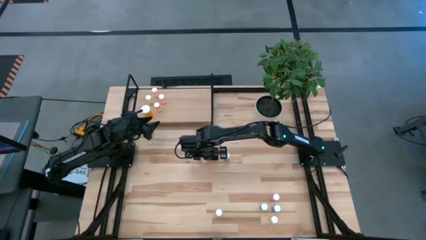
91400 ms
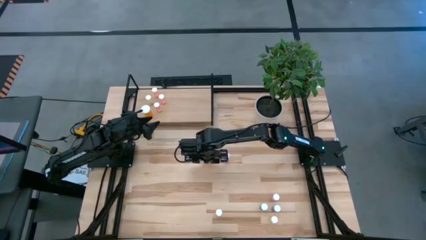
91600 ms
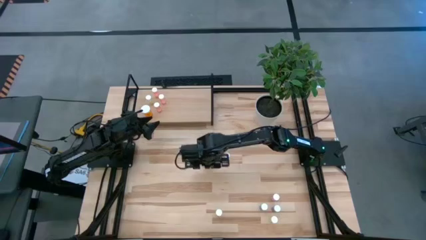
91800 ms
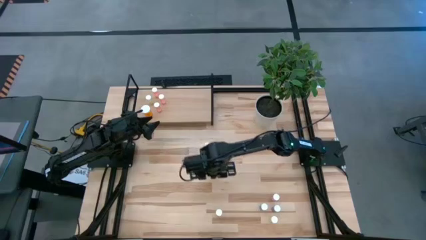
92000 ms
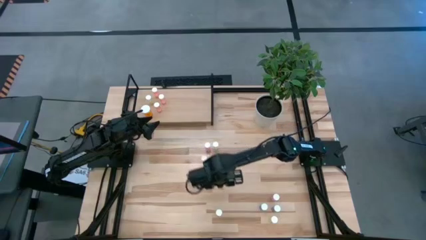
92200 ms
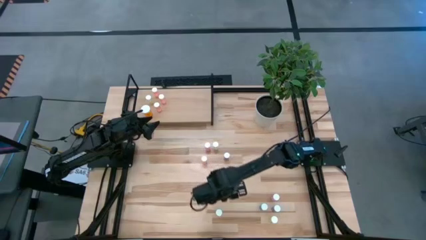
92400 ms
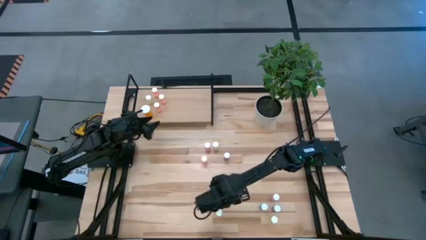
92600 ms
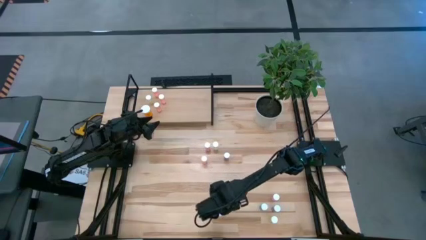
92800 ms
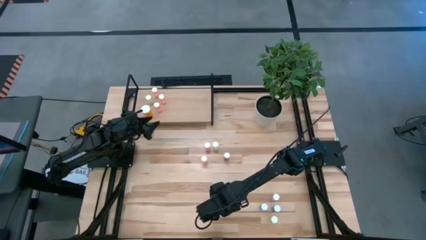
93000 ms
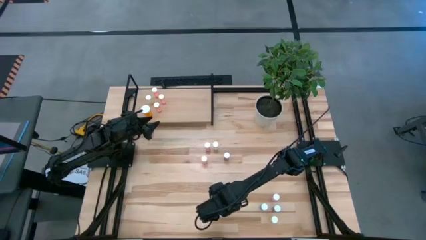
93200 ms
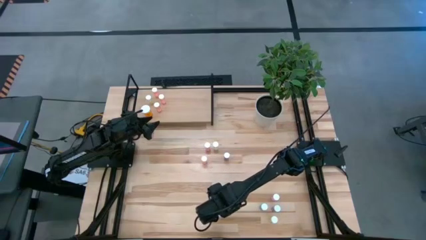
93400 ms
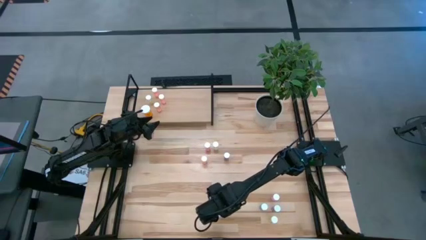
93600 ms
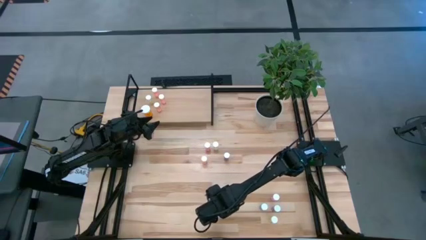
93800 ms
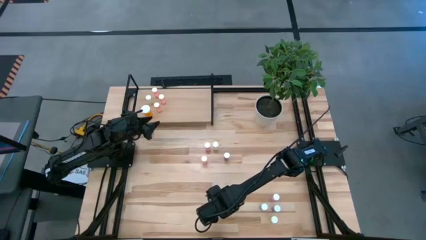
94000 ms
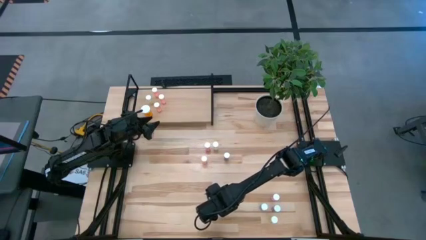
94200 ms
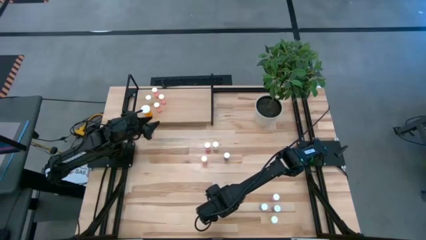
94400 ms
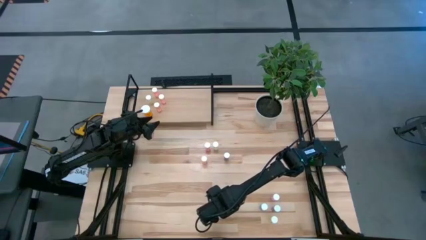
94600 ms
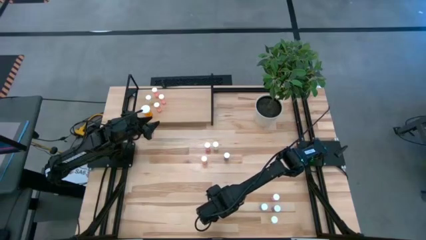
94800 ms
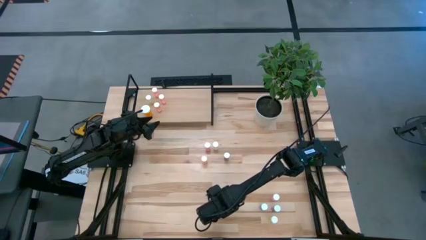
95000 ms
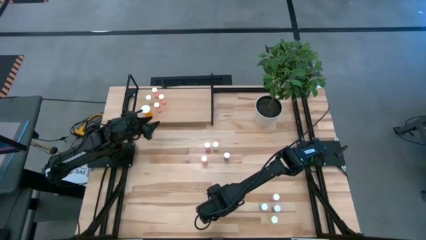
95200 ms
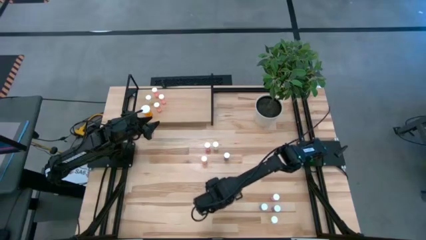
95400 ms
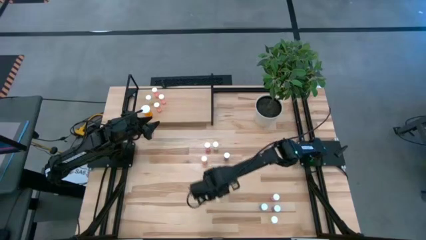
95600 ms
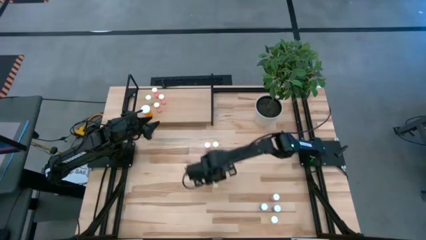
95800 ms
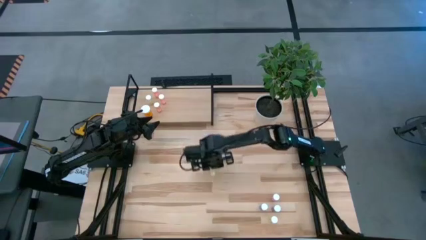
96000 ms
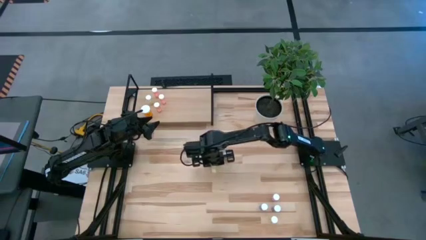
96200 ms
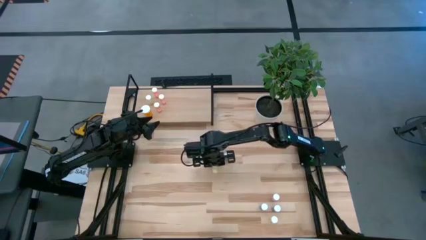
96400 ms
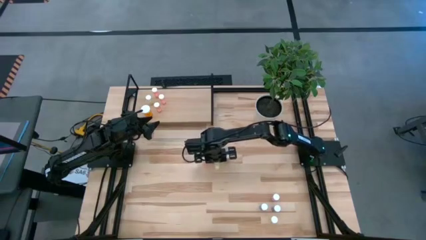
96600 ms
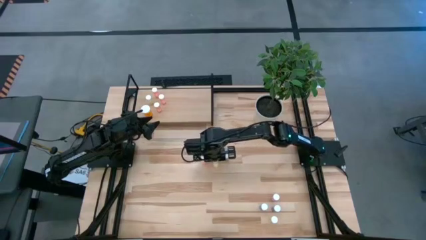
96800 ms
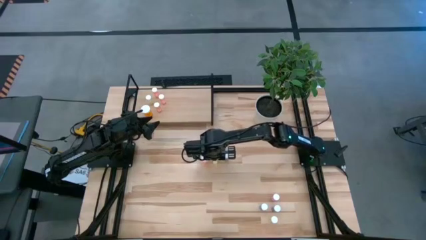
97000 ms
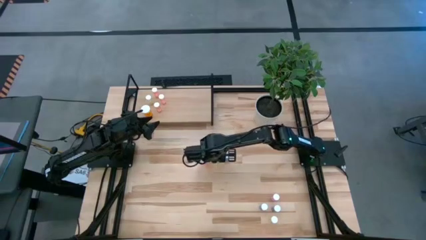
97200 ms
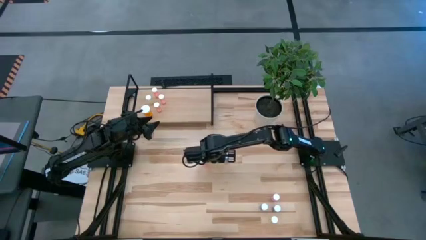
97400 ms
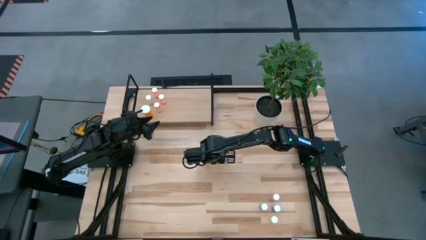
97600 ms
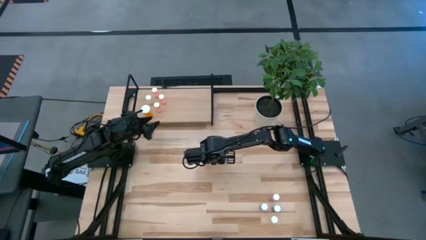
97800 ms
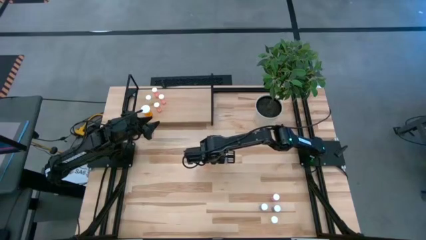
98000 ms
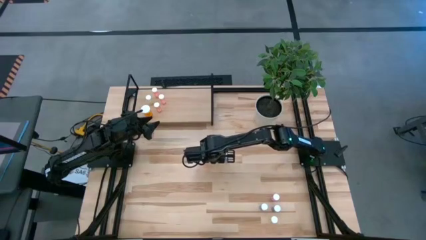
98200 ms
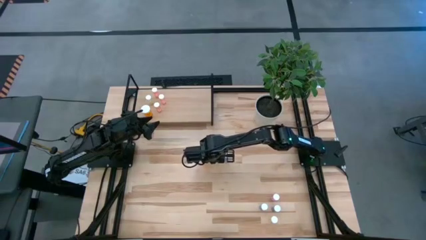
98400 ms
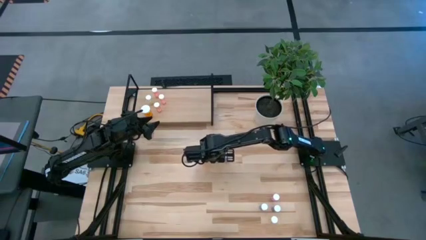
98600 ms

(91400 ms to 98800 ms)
Task: Pick and place medicine bottles onto shelf by color
Move the yellow pill bottle to the center

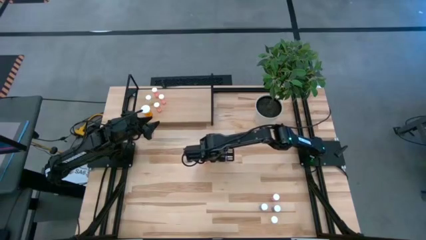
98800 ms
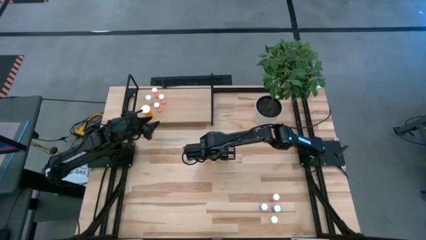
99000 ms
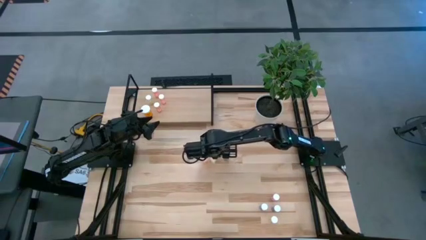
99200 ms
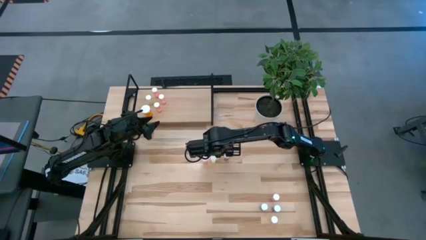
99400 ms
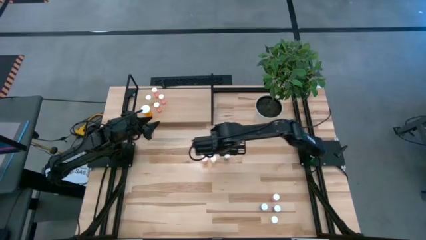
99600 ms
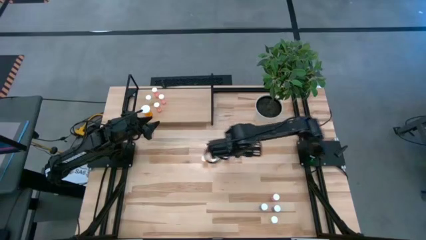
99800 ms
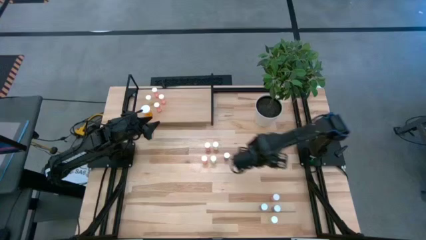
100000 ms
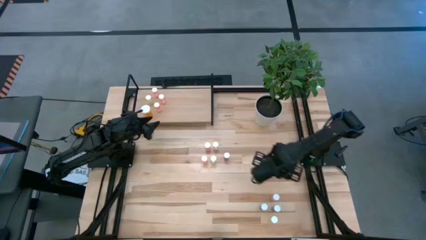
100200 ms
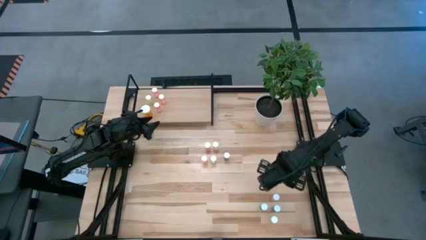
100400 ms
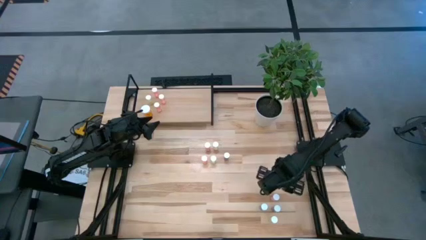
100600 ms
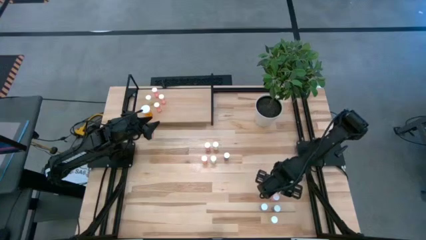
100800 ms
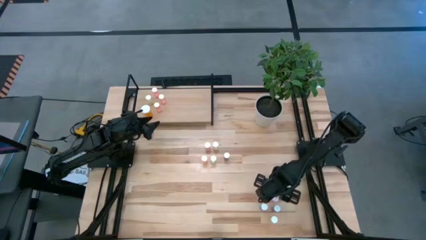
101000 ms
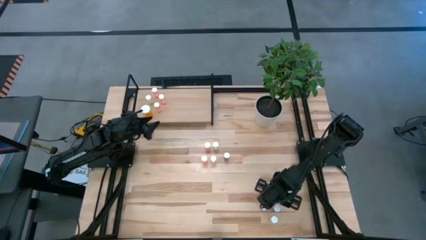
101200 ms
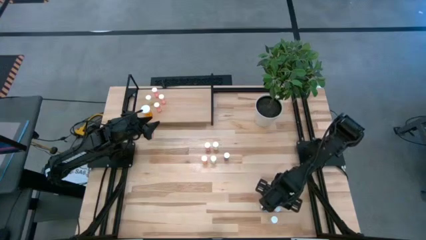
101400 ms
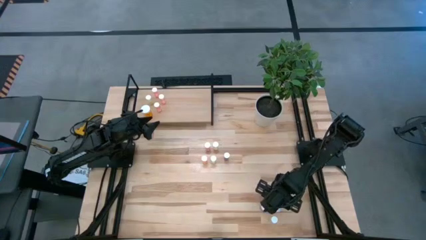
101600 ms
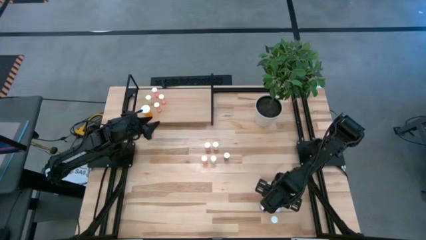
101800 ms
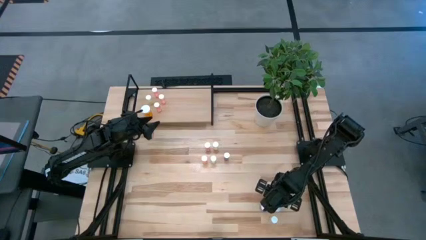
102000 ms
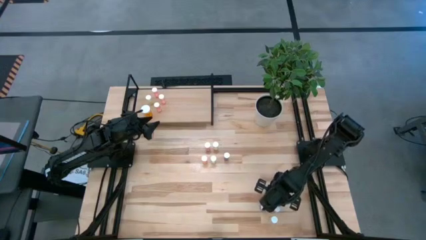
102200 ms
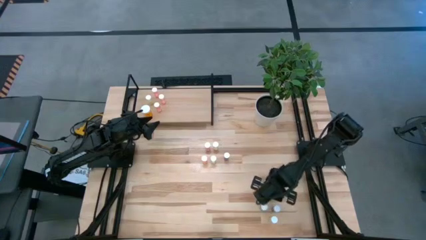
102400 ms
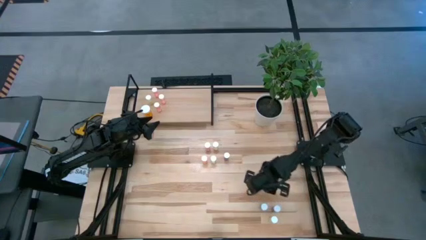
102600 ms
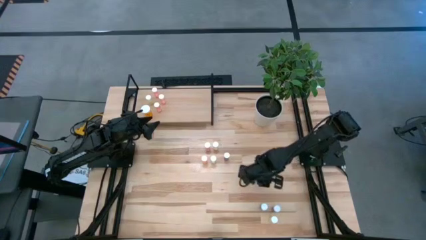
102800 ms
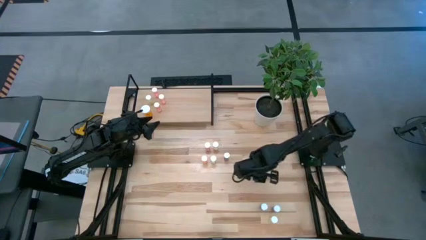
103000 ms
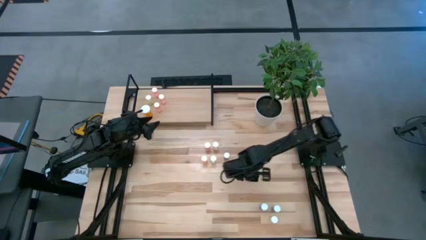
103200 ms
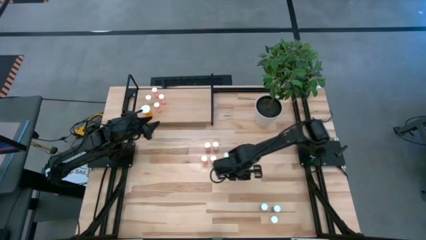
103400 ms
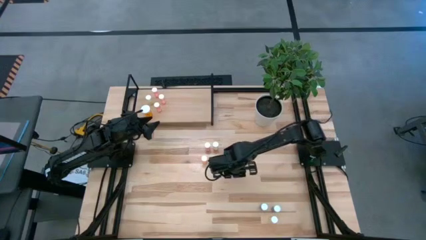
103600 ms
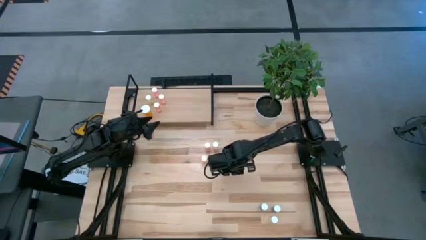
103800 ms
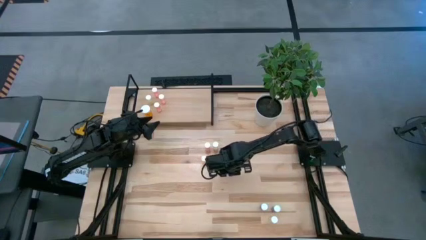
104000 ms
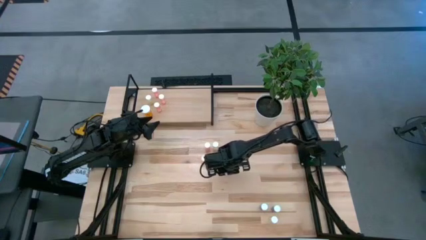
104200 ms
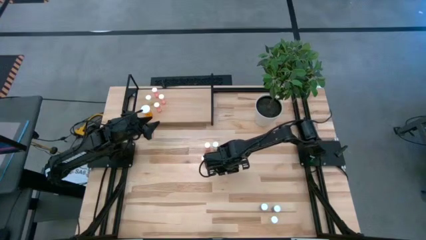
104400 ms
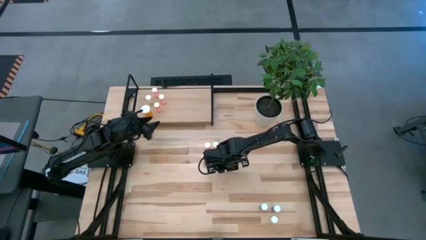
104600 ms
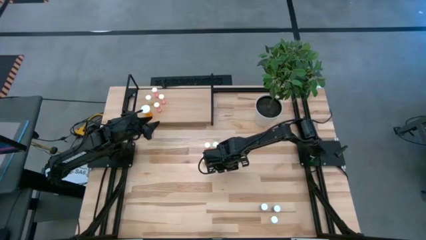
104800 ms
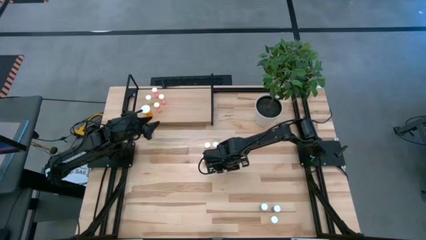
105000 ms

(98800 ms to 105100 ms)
Move the pink pill bottle to the center
